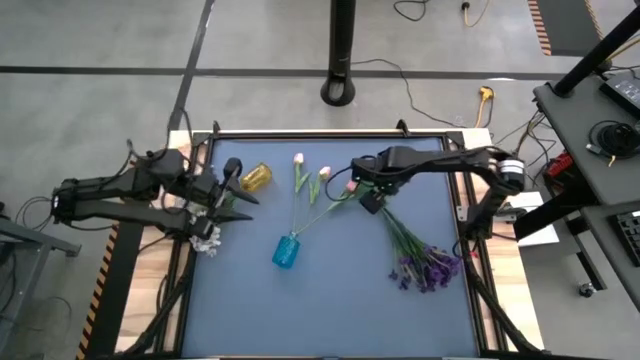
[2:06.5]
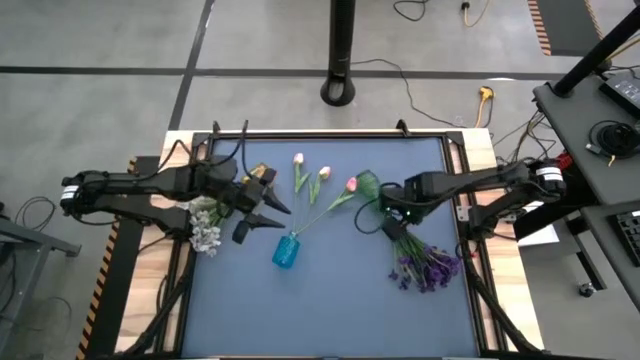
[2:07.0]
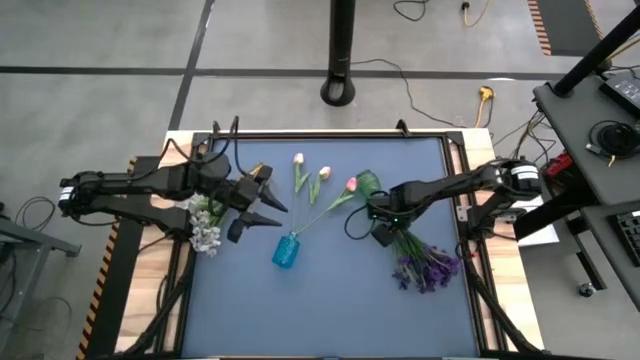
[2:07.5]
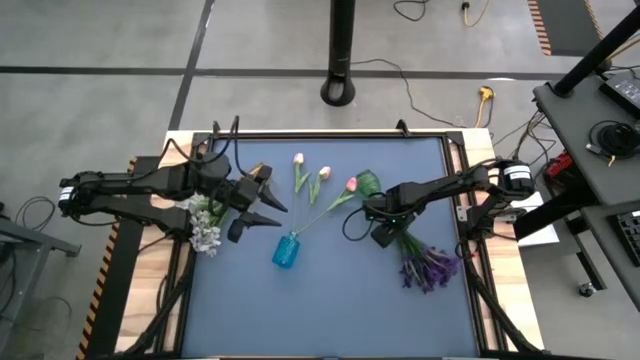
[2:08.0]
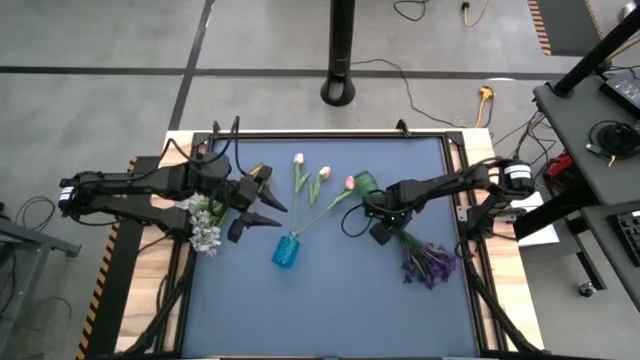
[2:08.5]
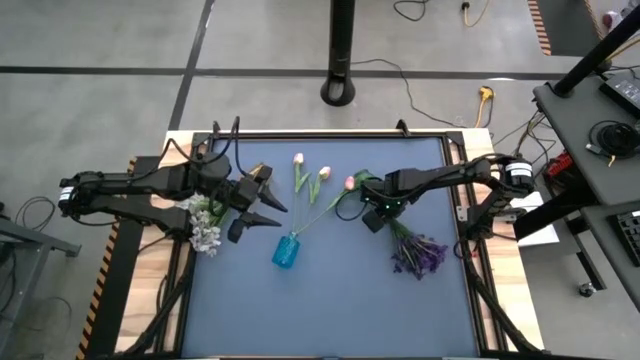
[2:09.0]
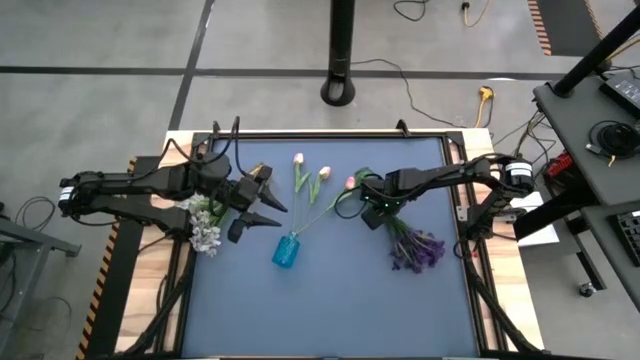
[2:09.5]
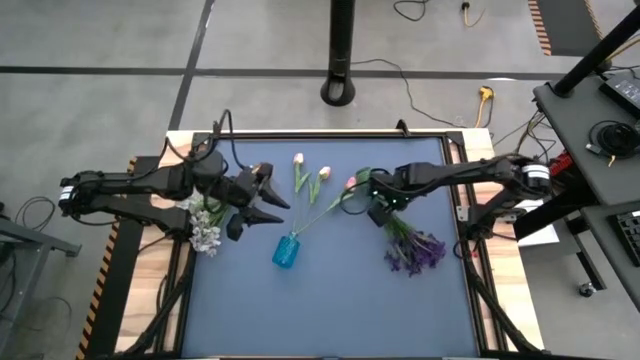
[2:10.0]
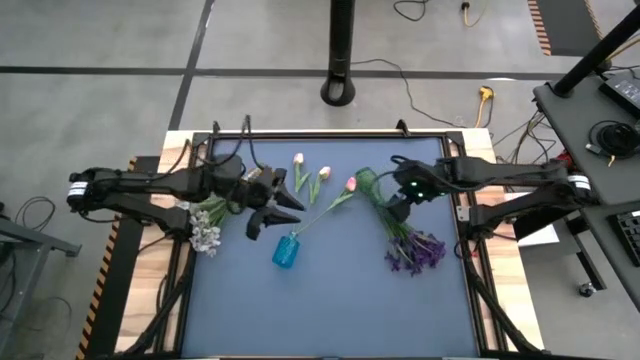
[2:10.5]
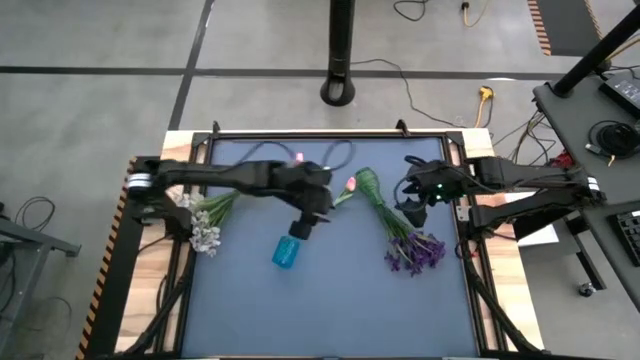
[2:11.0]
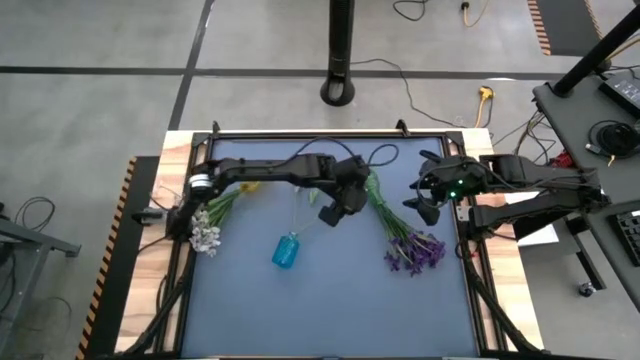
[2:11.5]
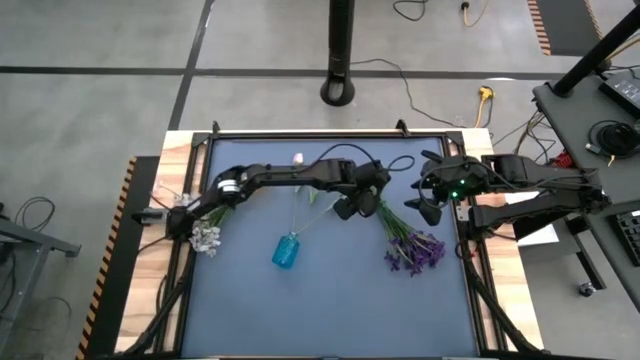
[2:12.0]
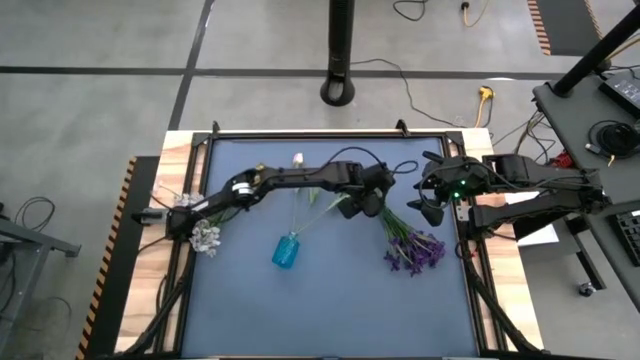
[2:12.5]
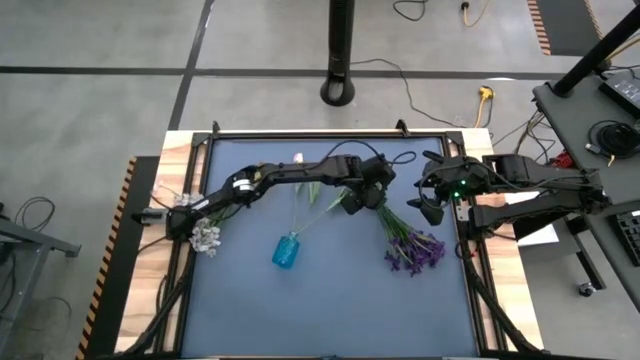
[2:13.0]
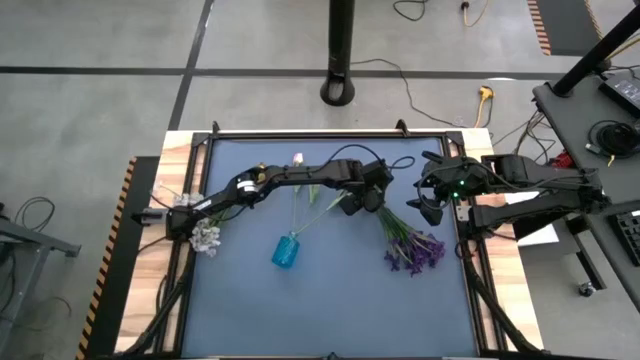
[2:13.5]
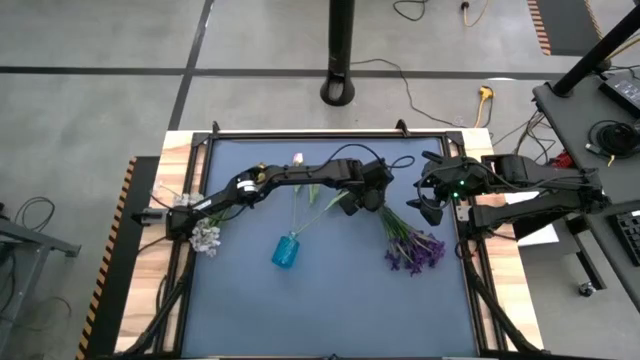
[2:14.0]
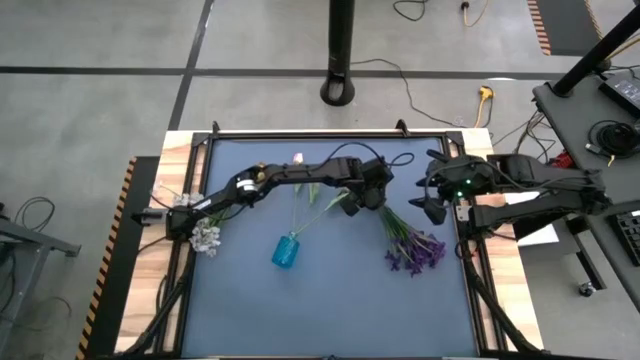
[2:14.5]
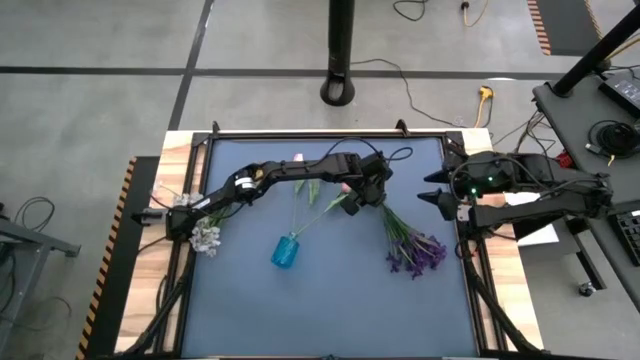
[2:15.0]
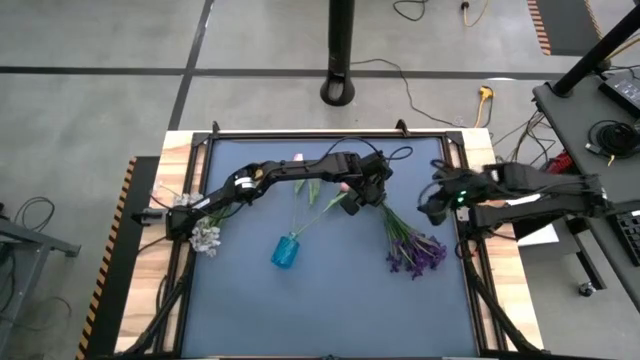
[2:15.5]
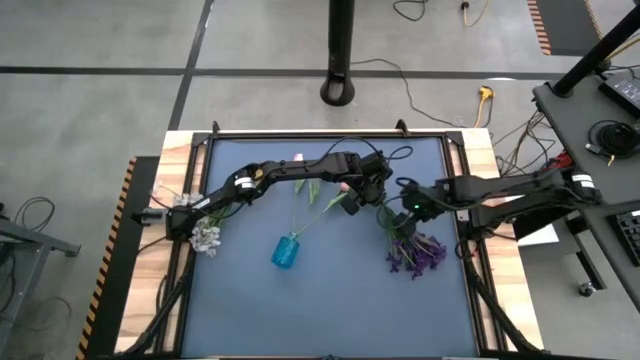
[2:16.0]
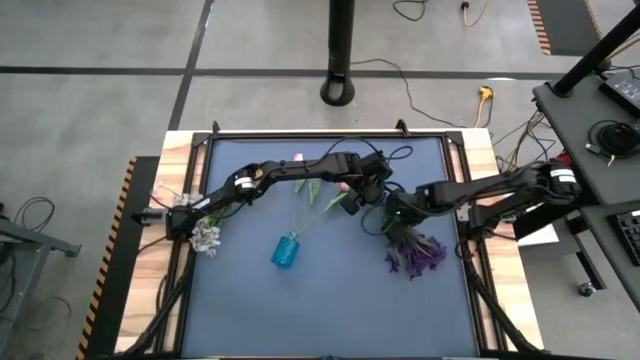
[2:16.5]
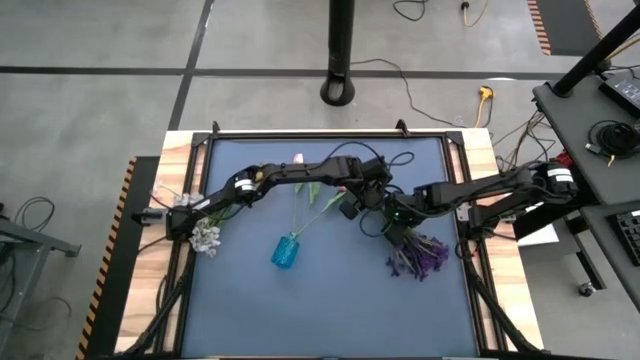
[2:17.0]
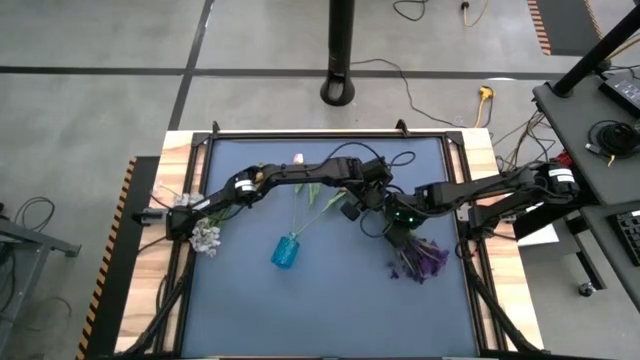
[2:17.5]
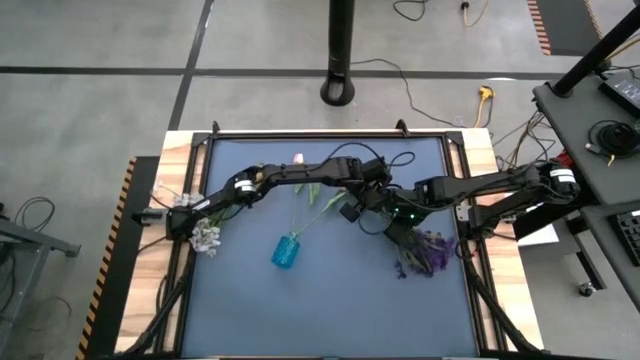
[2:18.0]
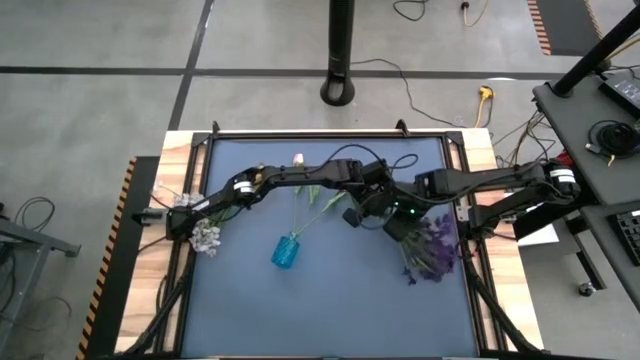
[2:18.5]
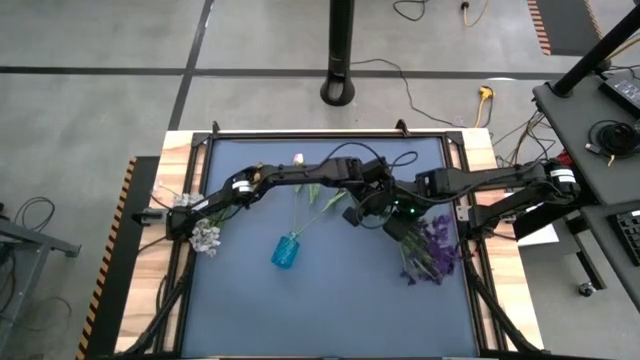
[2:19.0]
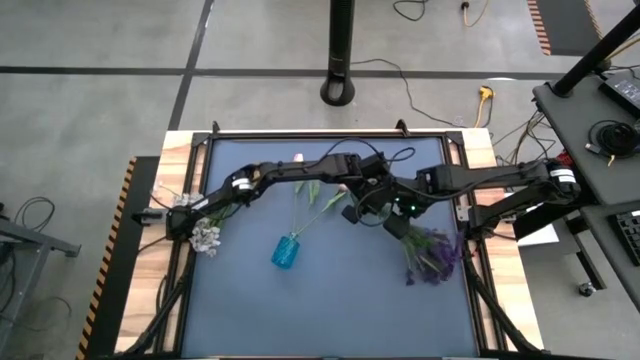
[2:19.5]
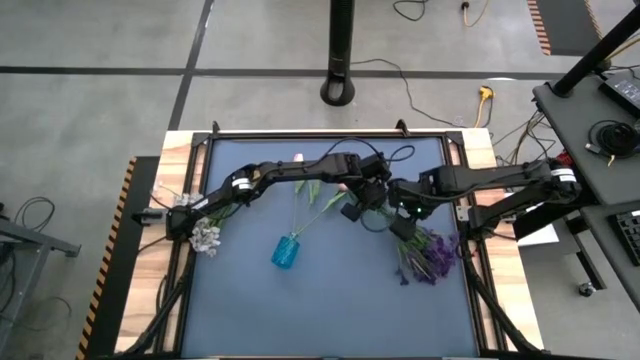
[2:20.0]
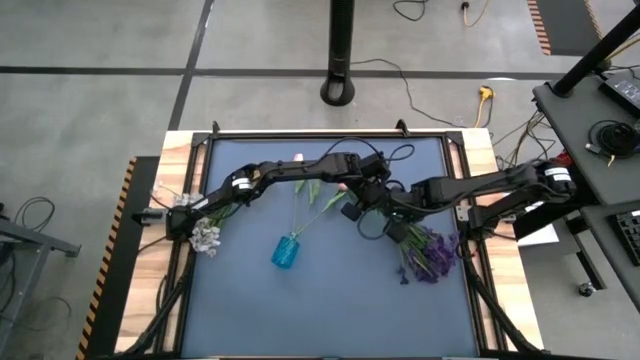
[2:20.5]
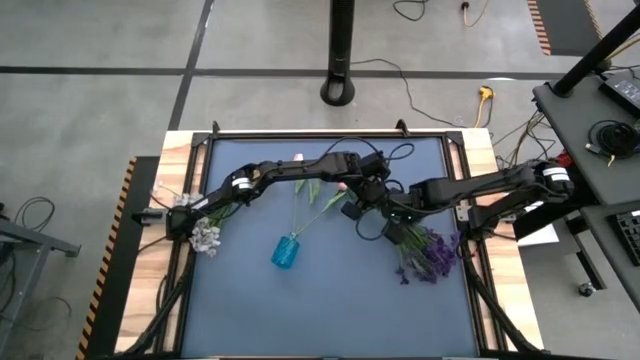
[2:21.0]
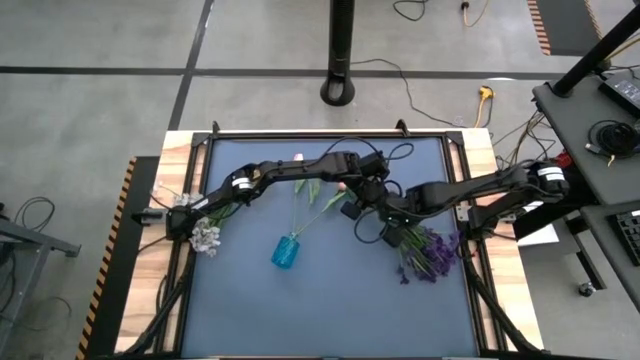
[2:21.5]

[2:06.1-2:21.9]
Task: Sort flowers into vase by color
Put the green vase with flowers on the table

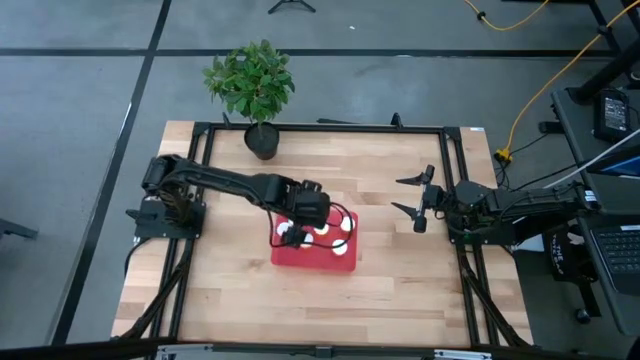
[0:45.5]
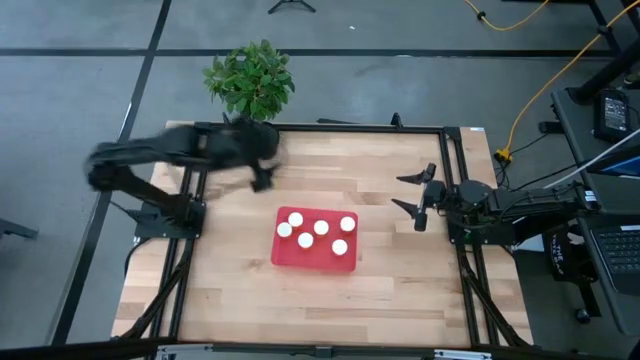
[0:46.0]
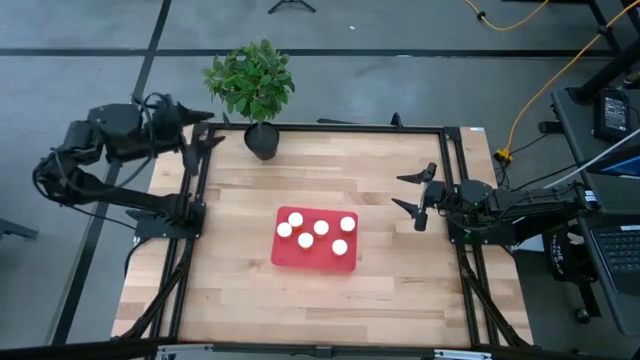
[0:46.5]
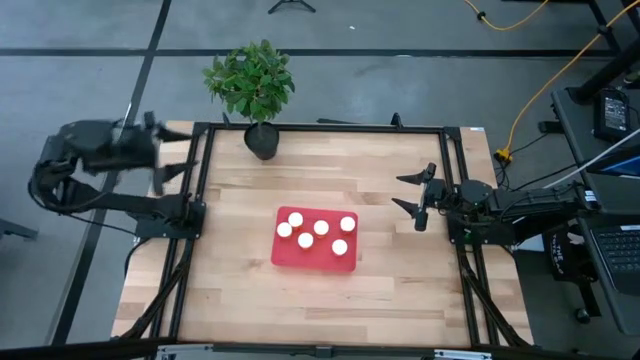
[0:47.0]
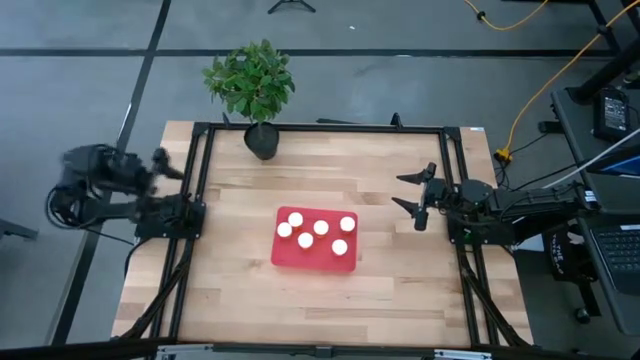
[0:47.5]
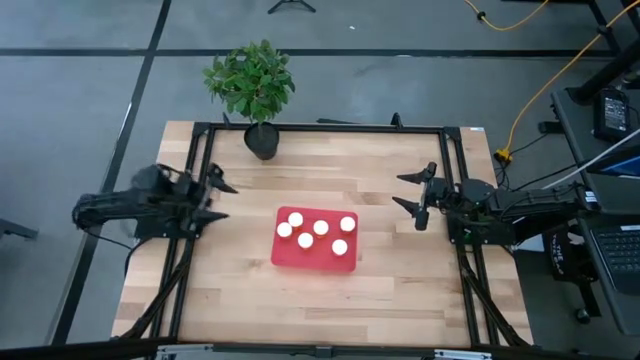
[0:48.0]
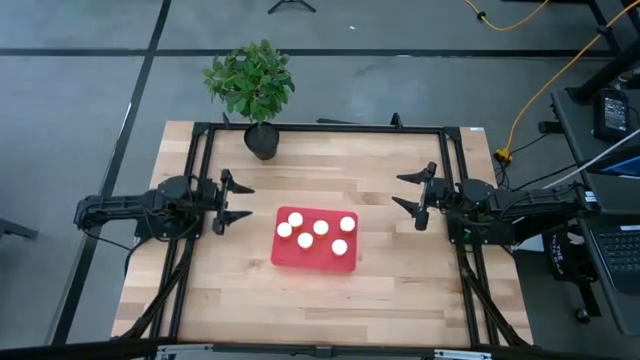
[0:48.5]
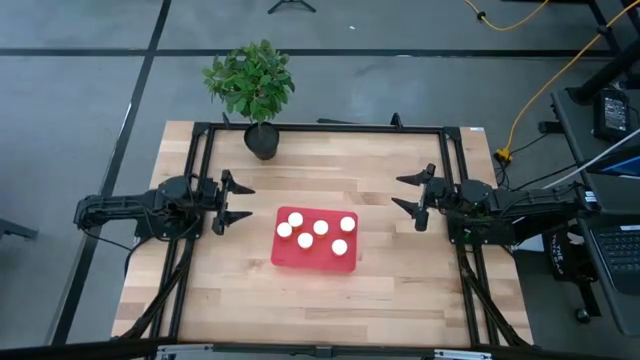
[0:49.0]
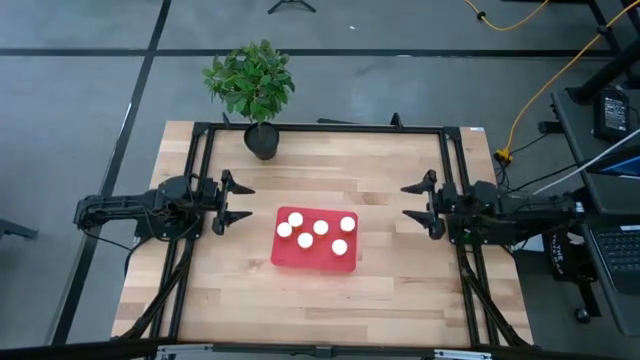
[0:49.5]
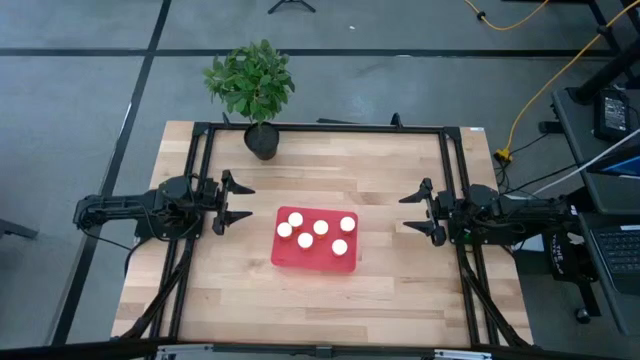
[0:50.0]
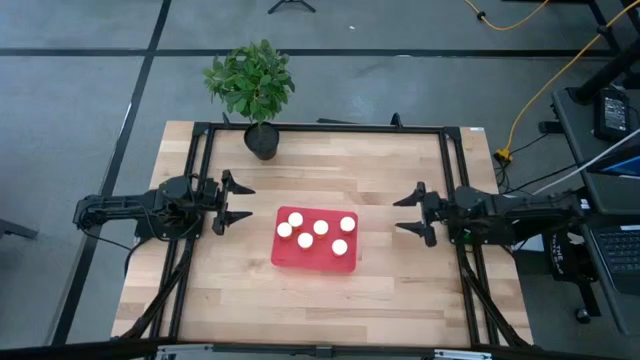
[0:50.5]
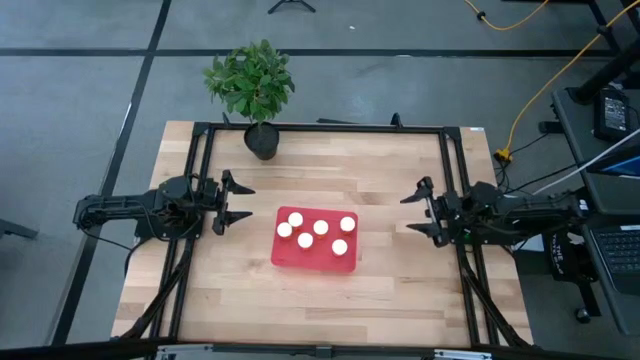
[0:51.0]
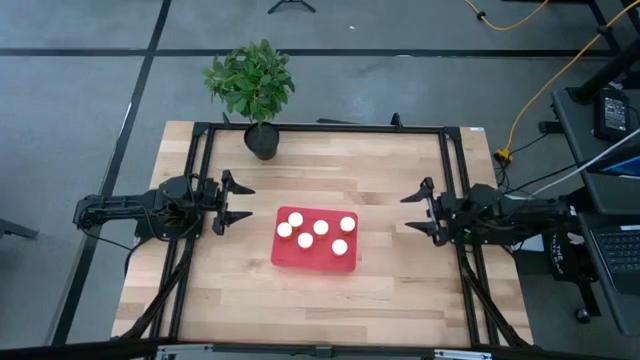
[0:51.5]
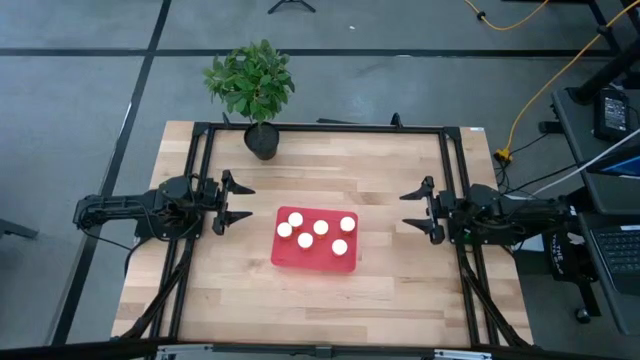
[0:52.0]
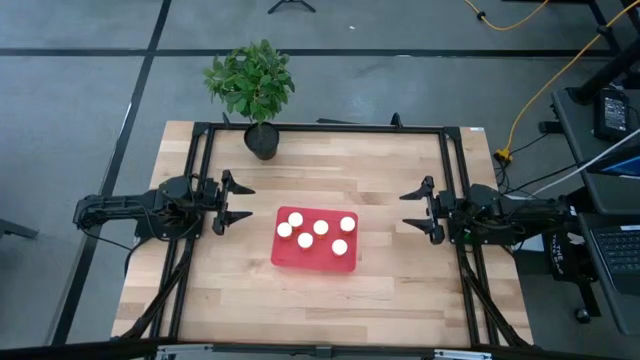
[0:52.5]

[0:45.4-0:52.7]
Task: Pick and place pill bottles into a basket
Return to Home Position
